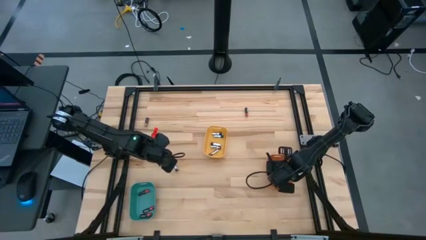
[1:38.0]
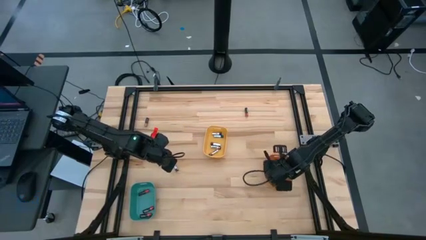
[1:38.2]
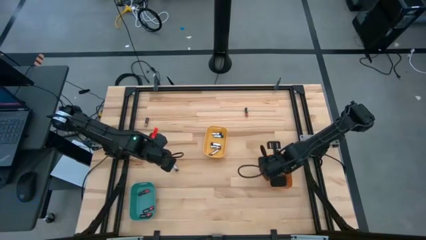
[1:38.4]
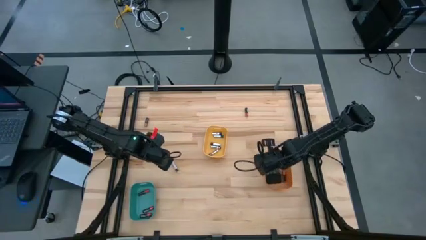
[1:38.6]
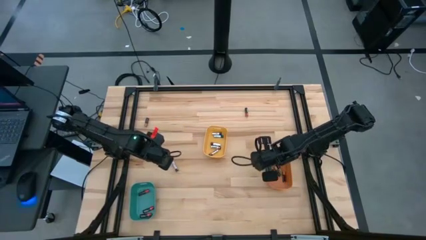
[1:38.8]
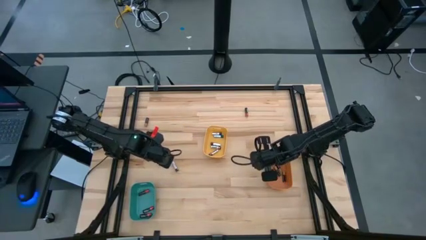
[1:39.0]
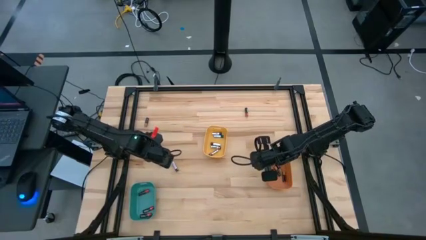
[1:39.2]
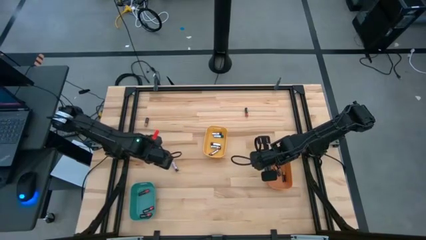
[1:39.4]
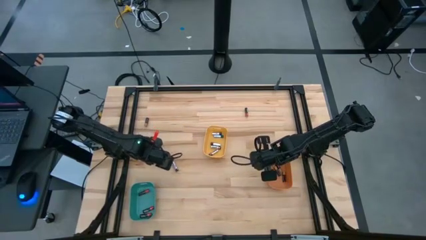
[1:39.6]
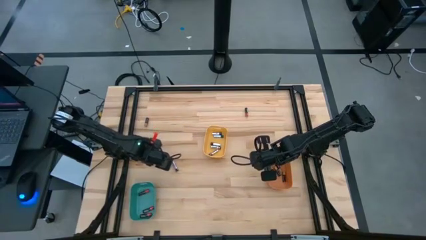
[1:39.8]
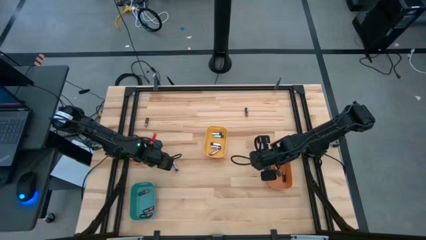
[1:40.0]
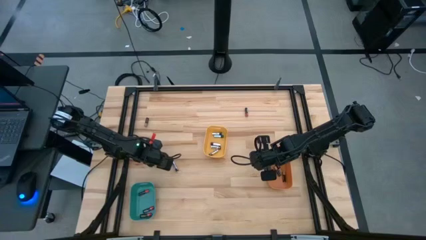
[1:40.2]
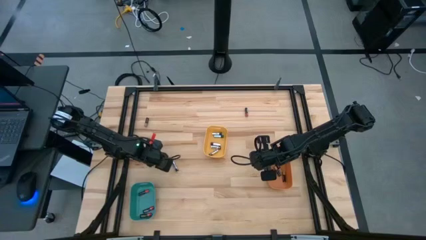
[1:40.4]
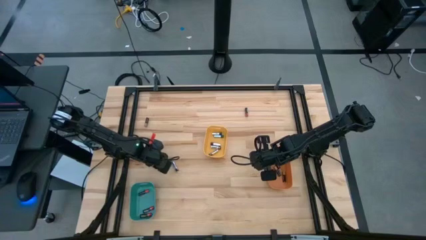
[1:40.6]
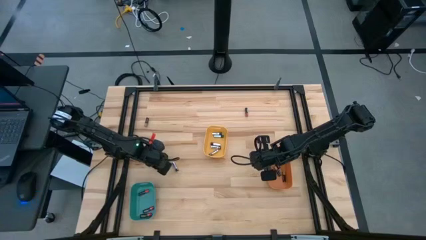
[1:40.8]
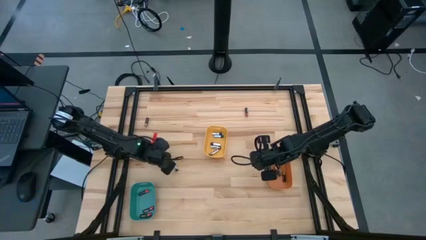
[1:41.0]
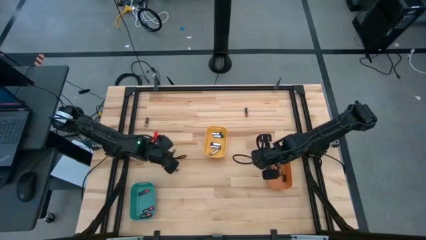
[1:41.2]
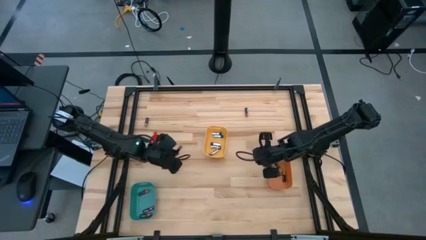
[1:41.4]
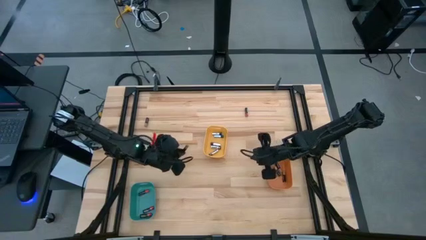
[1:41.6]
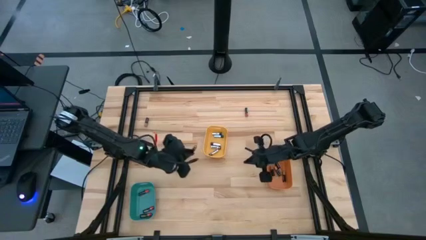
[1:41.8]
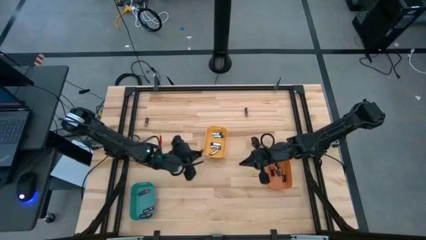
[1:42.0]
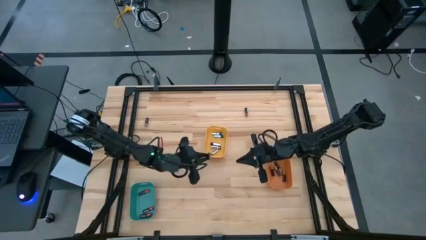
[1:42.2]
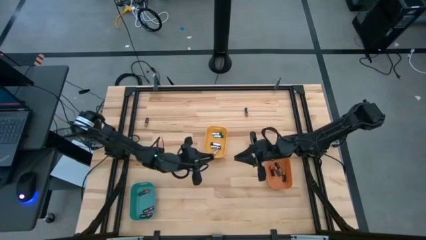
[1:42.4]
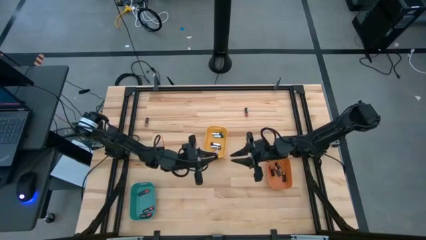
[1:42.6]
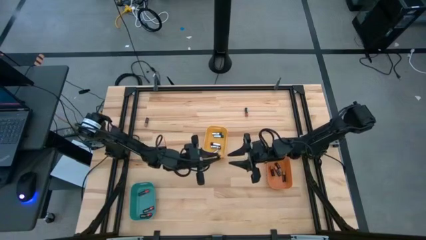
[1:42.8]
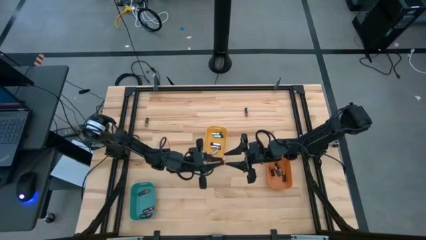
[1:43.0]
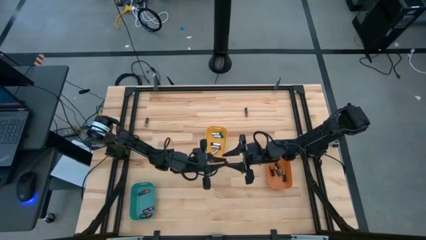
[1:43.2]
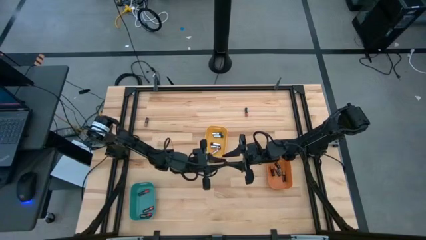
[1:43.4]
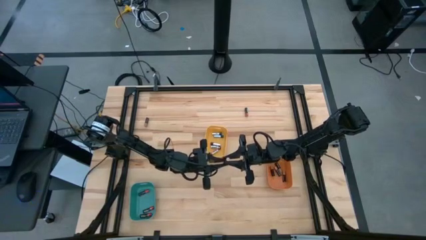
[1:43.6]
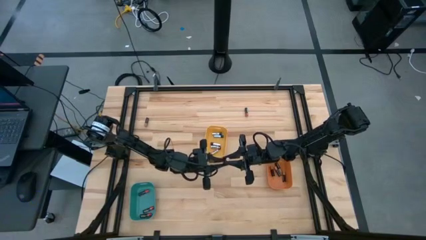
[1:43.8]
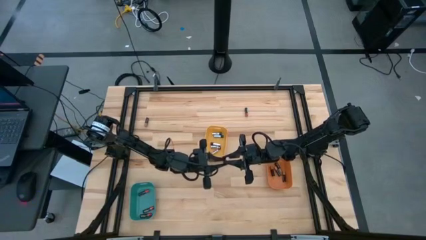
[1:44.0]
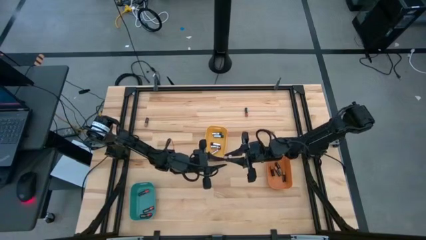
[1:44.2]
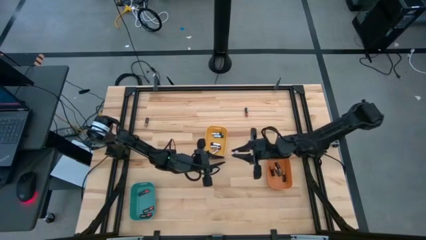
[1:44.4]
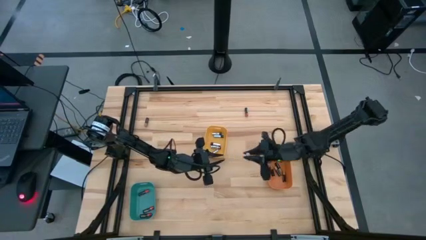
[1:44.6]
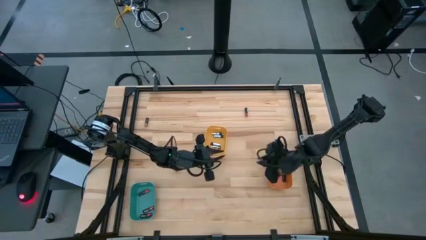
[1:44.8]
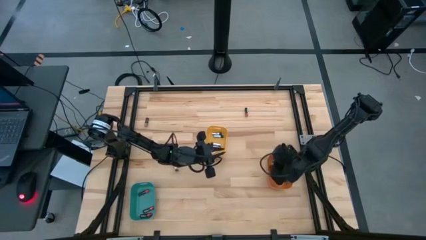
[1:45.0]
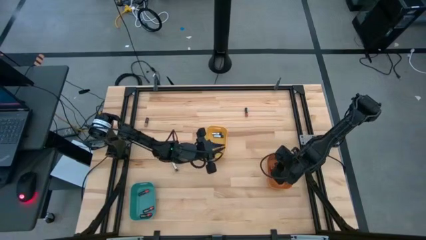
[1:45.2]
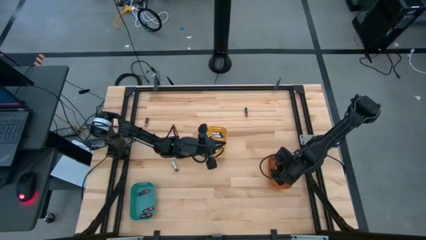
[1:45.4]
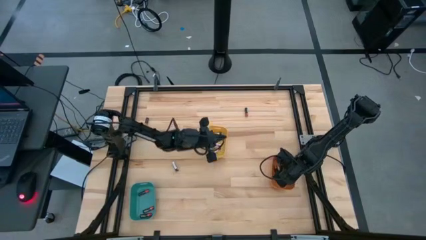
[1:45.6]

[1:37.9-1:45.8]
Task: Sort batteries
Put the brown battery into the orange bin

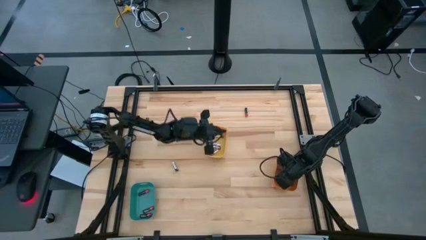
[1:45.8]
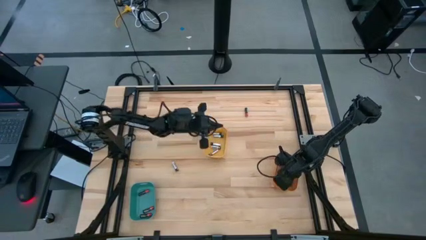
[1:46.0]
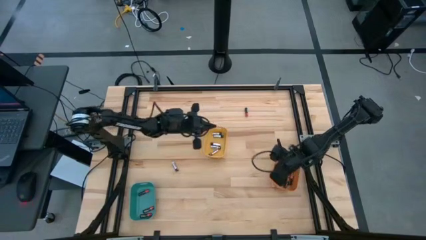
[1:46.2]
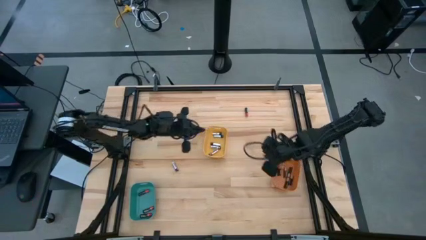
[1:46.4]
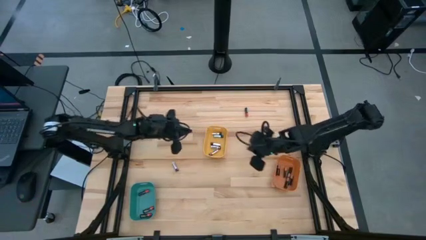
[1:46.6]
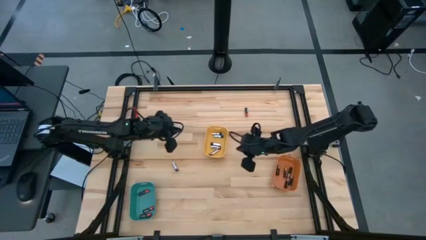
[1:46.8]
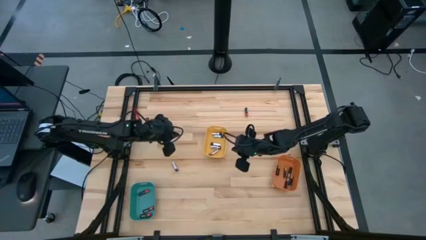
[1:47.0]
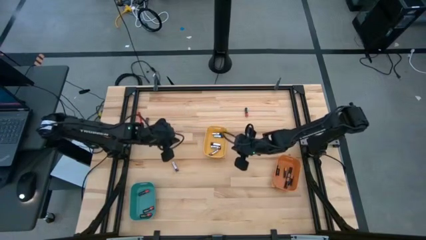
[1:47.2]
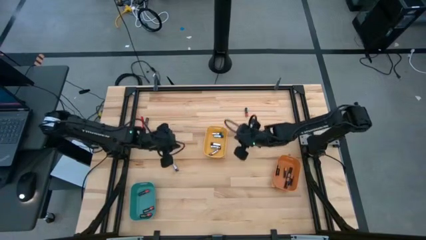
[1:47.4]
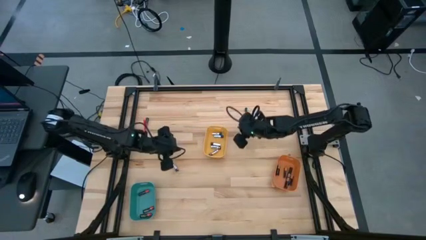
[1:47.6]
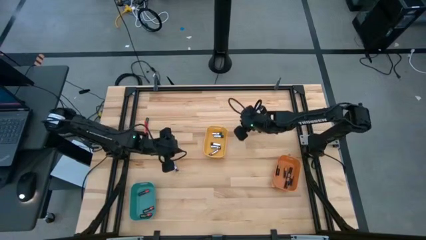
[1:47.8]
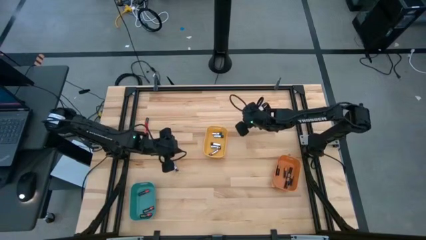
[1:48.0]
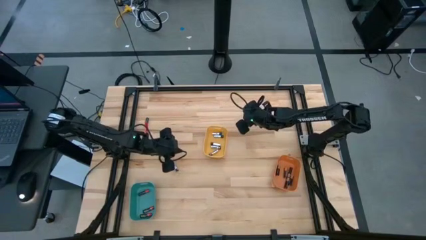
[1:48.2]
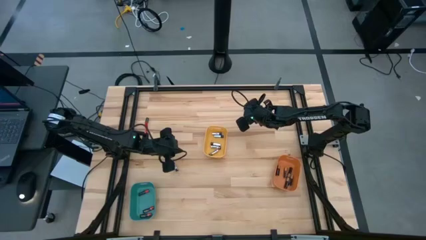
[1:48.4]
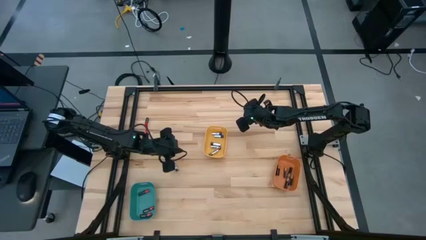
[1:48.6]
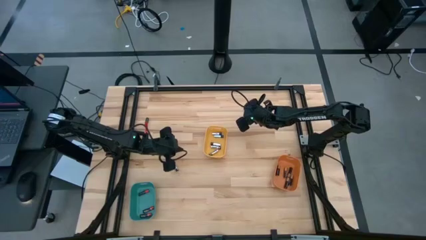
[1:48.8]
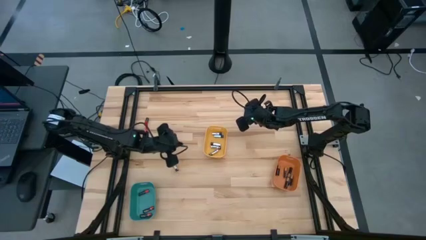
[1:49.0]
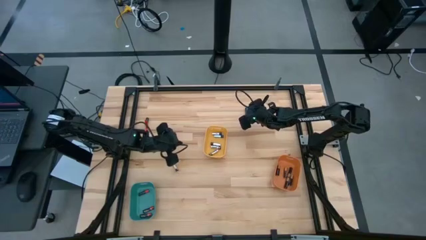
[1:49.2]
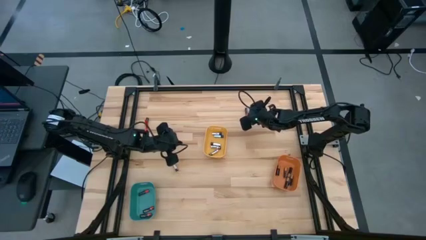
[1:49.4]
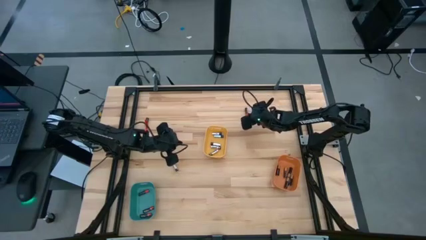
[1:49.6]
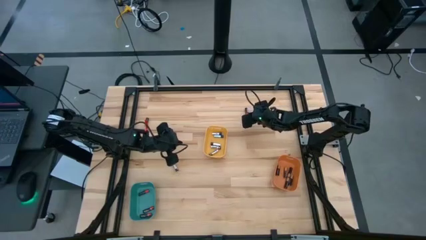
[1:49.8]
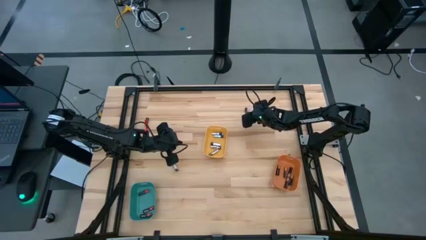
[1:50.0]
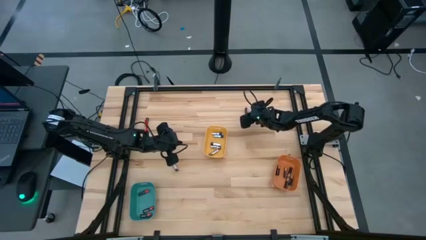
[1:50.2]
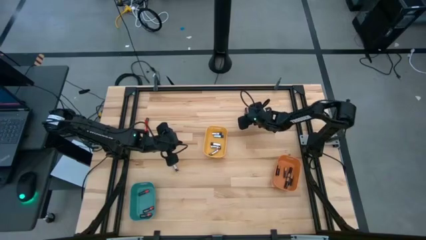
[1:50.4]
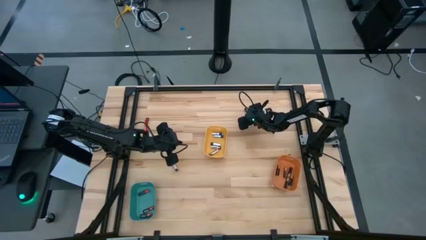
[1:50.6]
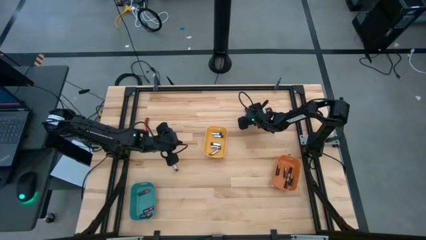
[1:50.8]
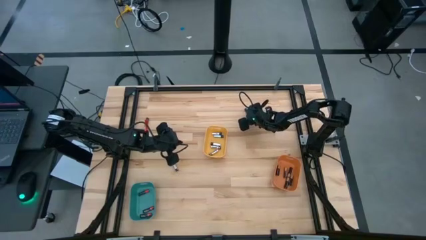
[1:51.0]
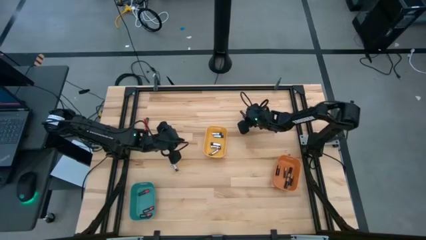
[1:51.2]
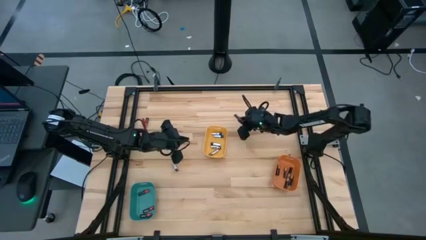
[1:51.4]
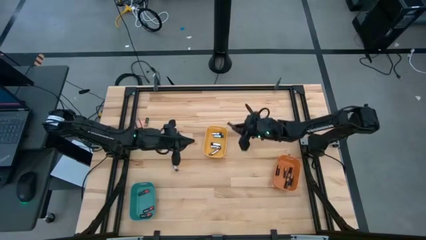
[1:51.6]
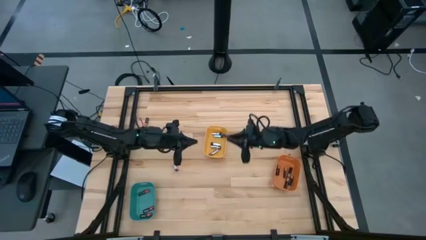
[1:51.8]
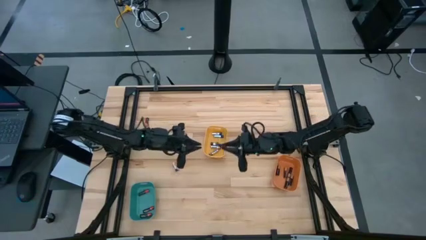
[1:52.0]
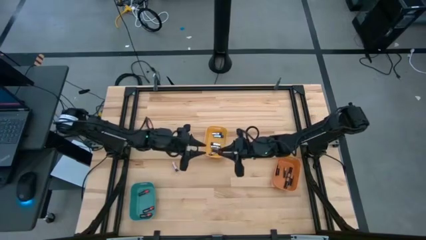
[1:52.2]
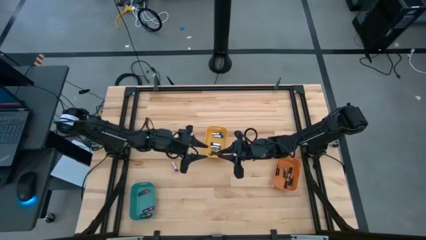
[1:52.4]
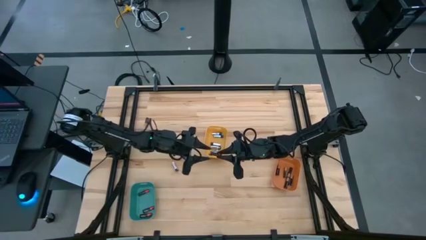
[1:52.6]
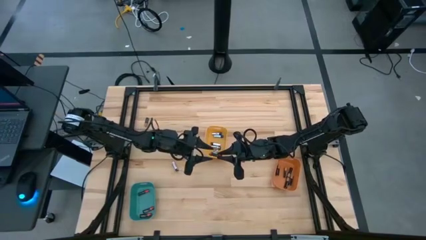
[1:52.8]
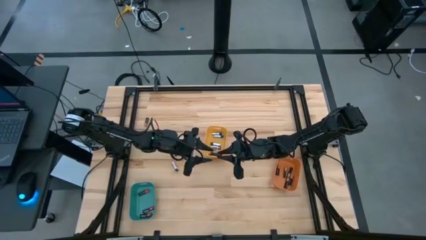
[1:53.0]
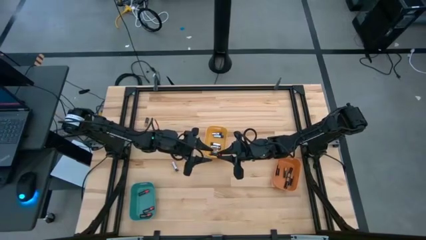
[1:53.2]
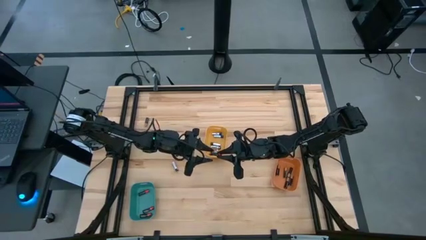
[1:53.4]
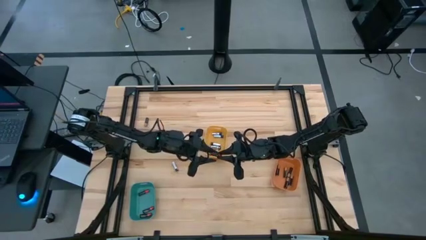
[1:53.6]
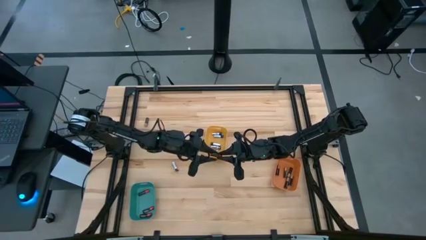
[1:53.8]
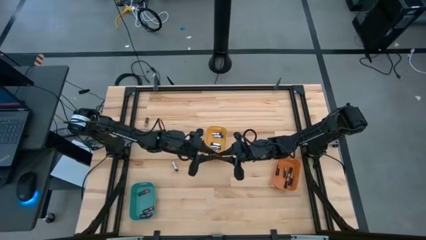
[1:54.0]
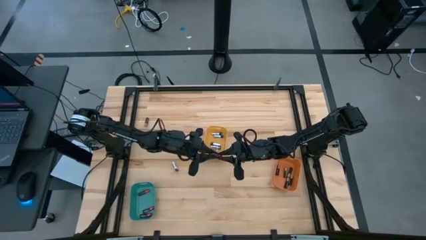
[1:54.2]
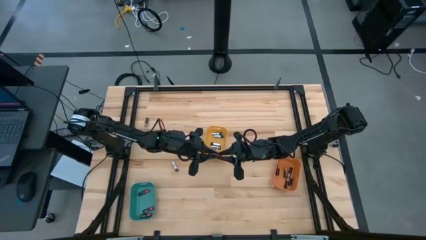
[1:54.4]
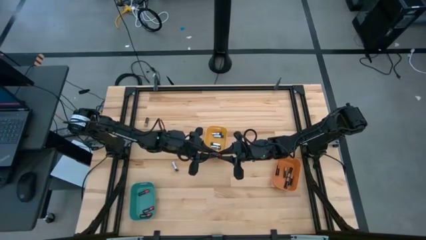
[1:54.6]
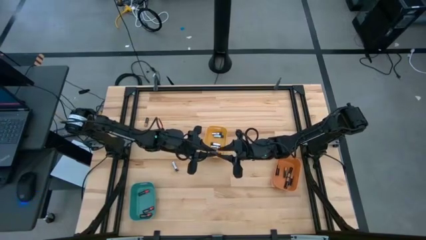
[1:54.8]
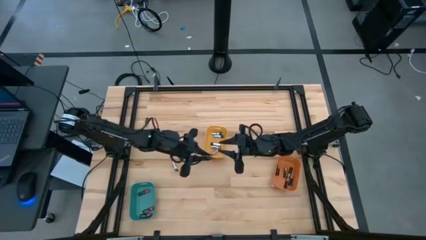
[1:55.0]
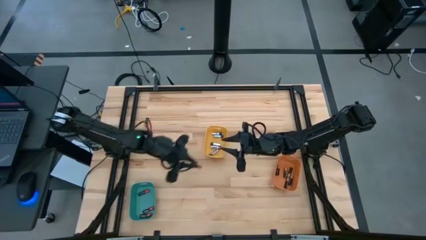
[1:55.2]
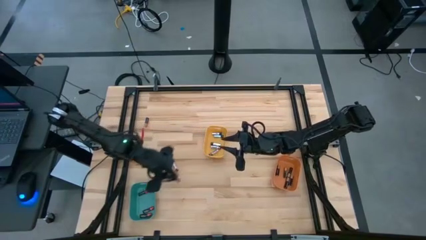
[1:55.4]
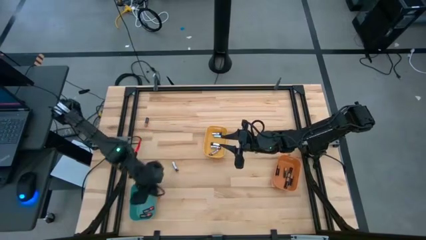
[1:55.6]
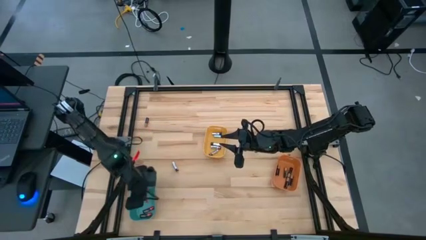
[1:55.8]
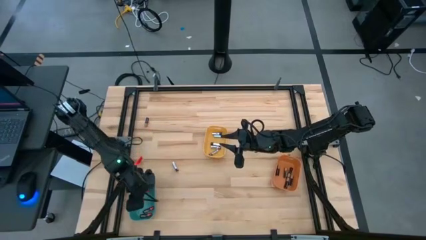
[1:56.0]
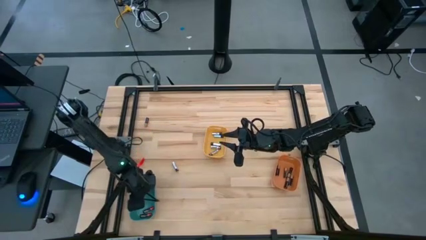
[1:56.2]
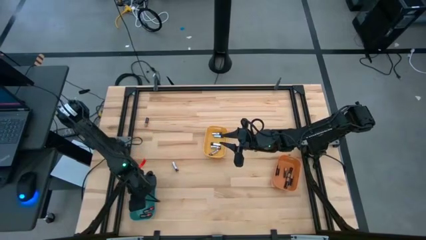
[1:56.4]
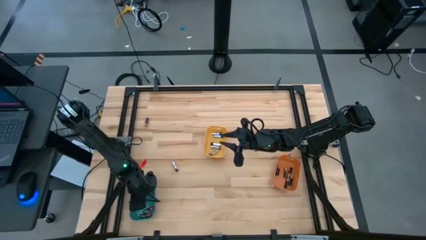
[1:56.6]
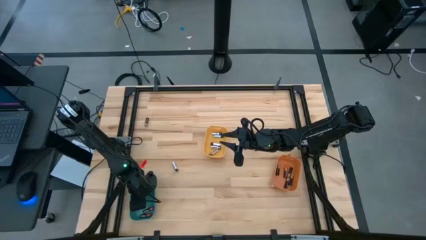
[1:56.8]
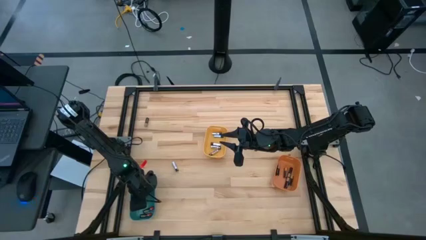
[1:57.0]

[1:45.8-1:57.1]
Put the red battery into the blue bin
